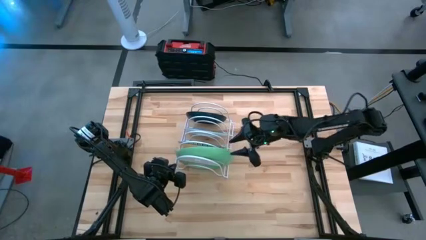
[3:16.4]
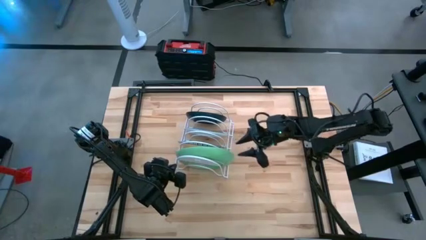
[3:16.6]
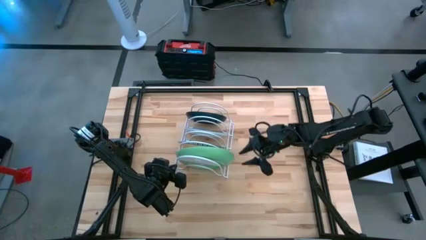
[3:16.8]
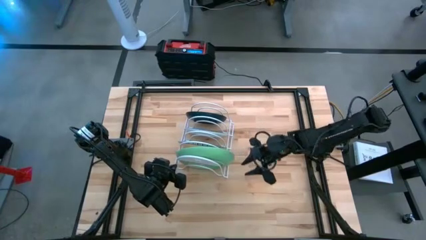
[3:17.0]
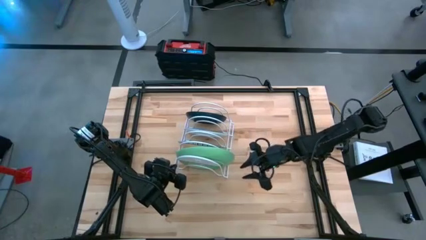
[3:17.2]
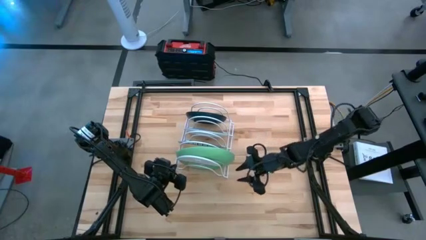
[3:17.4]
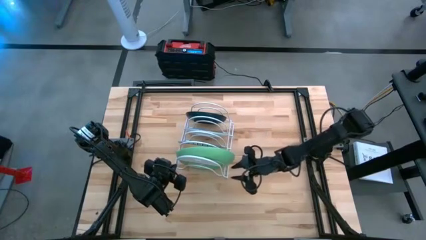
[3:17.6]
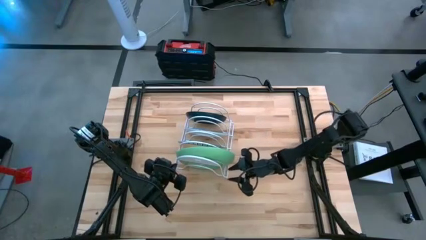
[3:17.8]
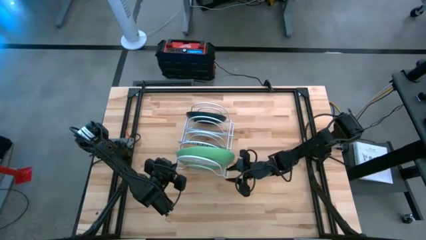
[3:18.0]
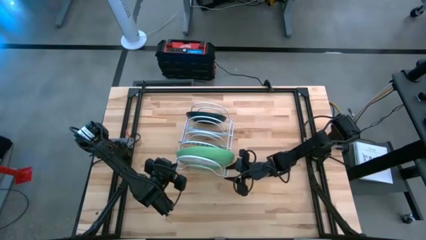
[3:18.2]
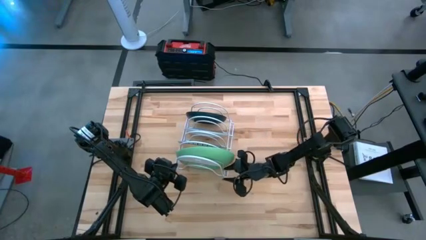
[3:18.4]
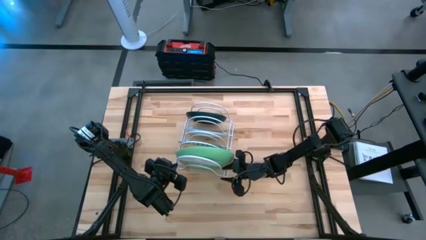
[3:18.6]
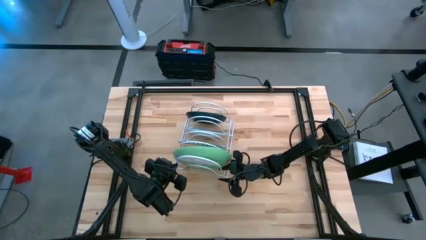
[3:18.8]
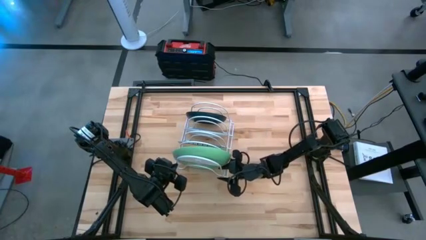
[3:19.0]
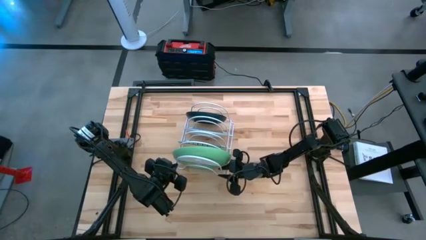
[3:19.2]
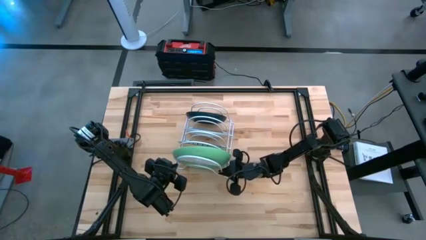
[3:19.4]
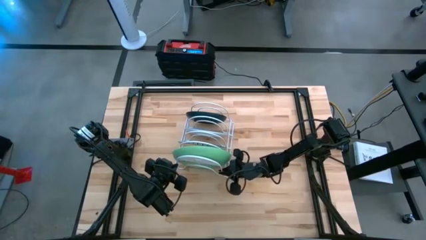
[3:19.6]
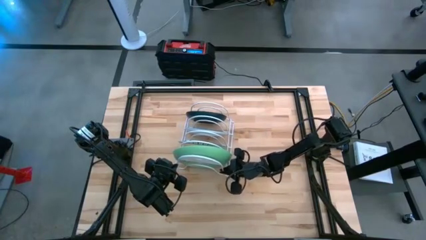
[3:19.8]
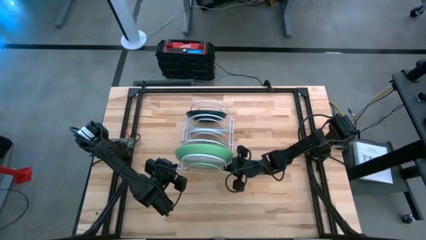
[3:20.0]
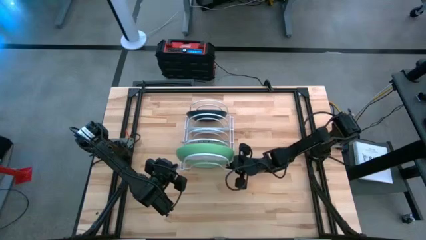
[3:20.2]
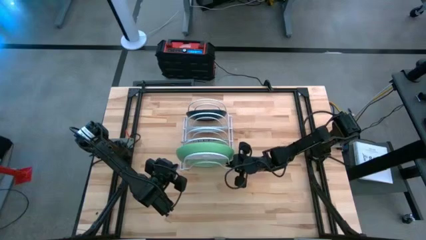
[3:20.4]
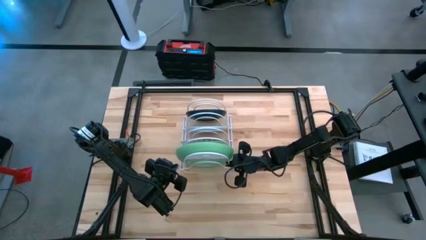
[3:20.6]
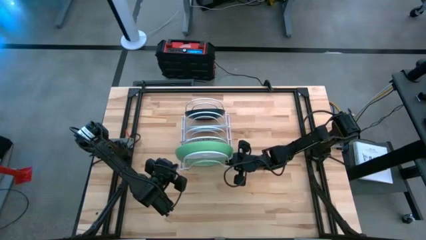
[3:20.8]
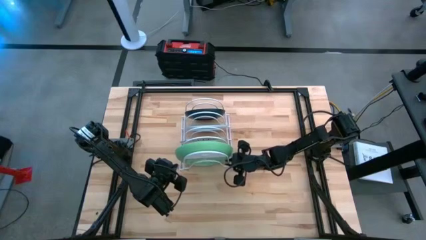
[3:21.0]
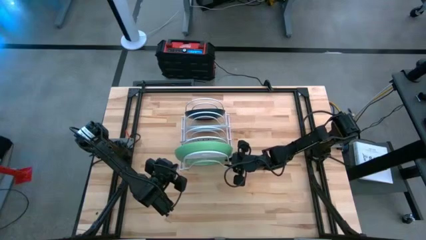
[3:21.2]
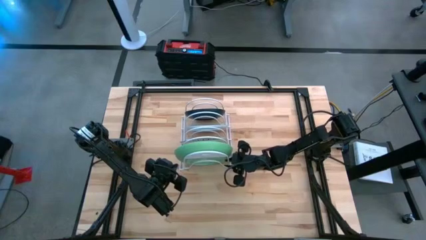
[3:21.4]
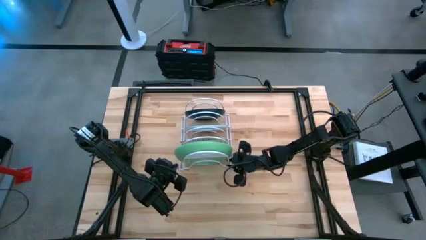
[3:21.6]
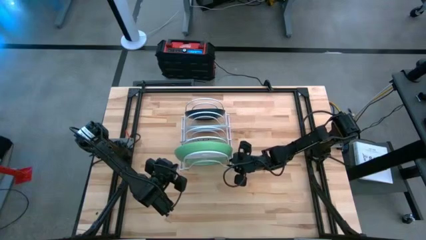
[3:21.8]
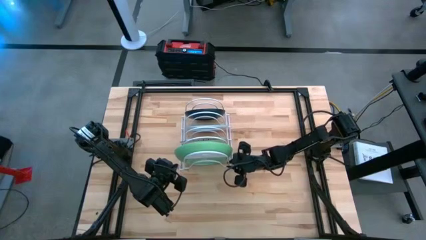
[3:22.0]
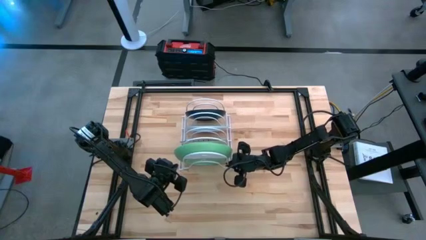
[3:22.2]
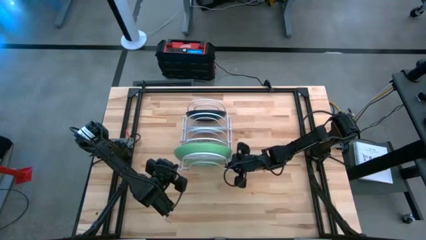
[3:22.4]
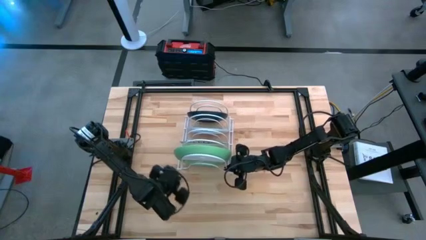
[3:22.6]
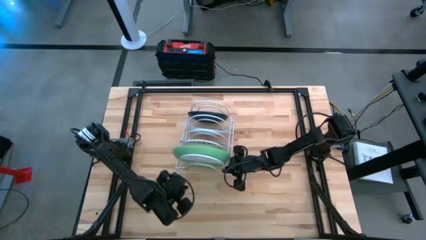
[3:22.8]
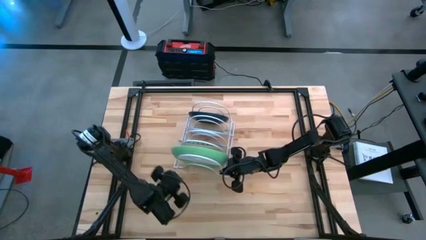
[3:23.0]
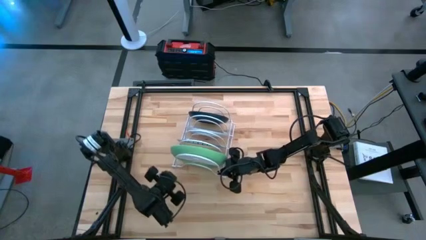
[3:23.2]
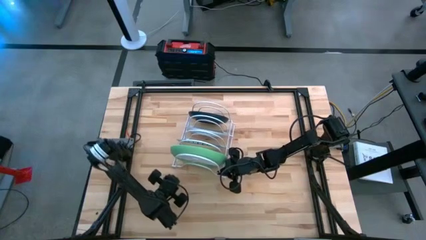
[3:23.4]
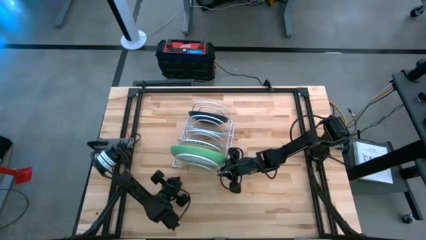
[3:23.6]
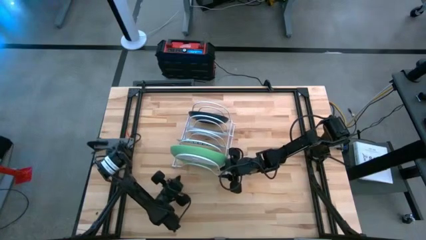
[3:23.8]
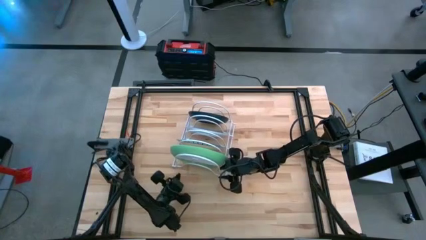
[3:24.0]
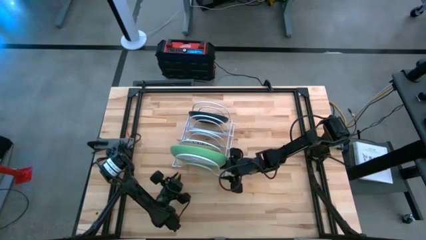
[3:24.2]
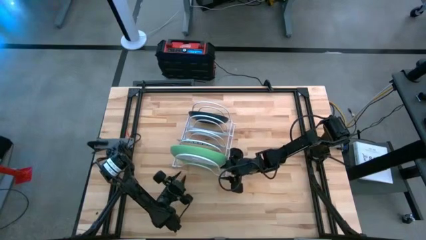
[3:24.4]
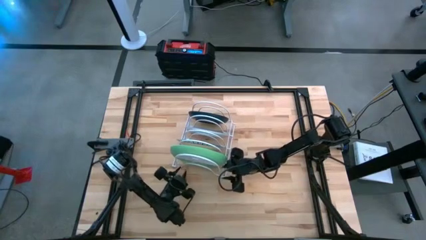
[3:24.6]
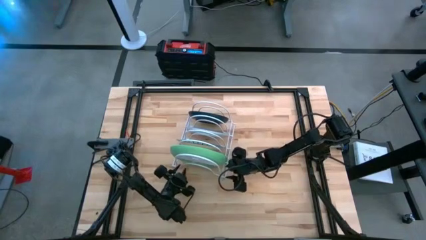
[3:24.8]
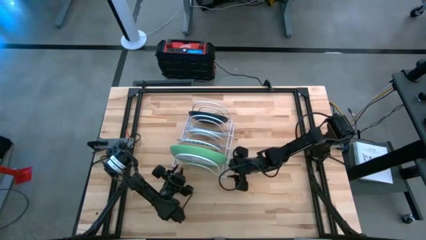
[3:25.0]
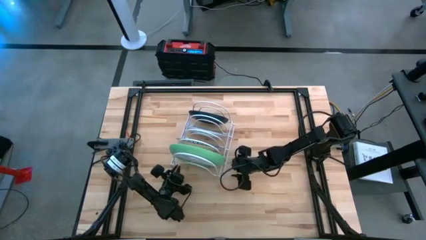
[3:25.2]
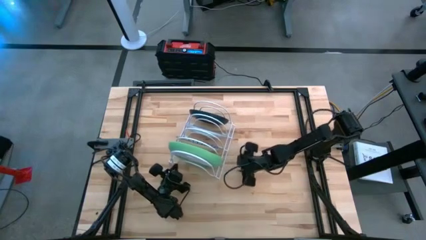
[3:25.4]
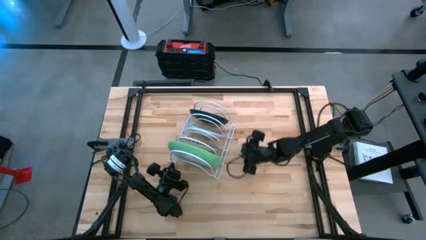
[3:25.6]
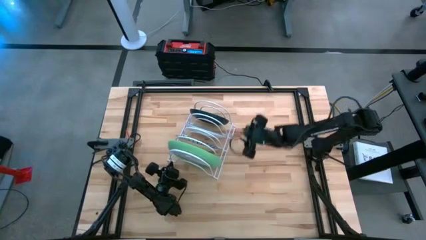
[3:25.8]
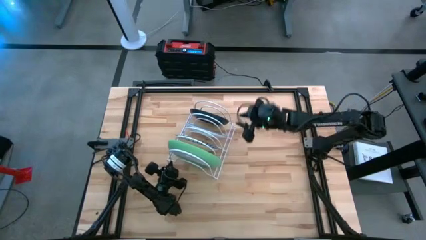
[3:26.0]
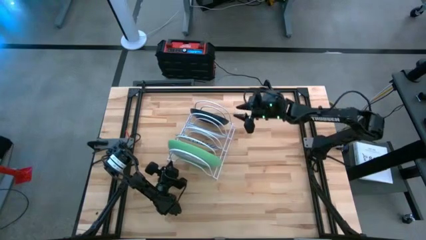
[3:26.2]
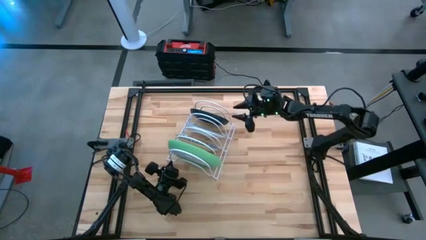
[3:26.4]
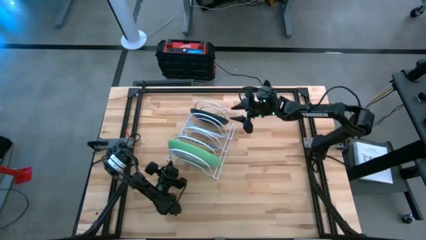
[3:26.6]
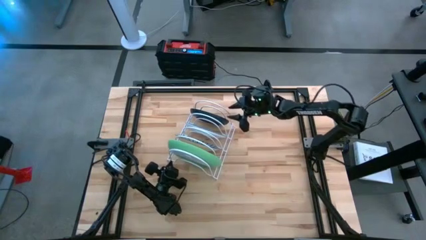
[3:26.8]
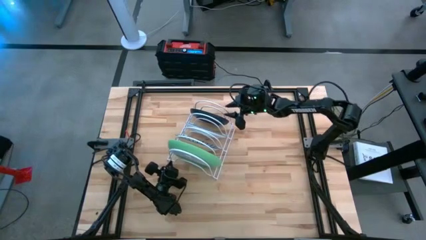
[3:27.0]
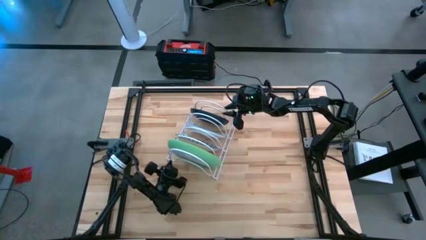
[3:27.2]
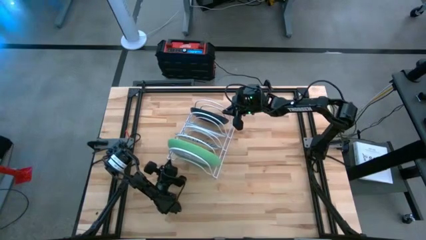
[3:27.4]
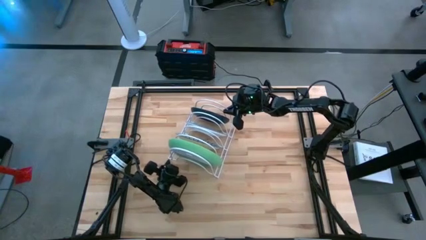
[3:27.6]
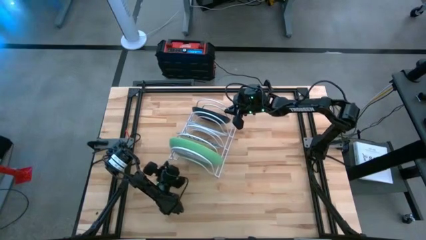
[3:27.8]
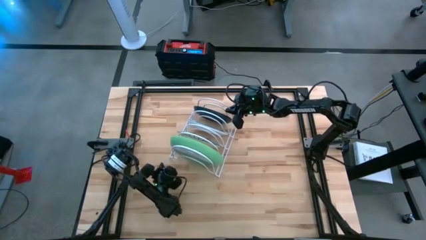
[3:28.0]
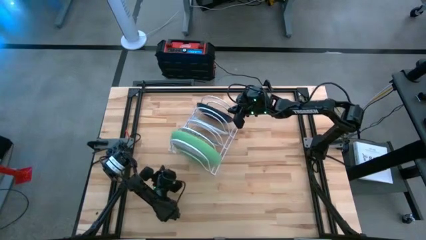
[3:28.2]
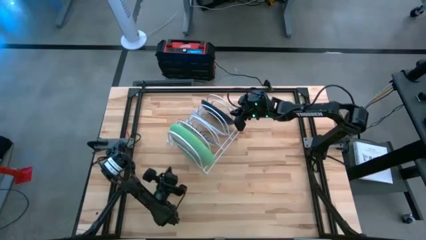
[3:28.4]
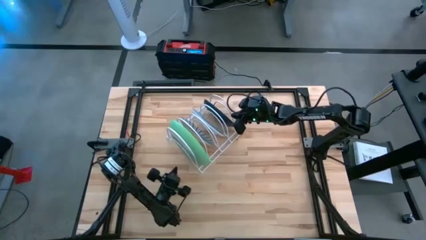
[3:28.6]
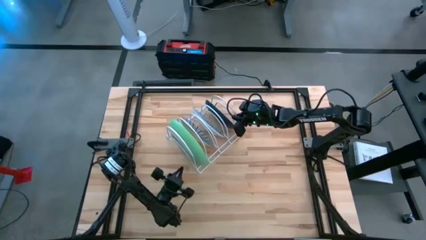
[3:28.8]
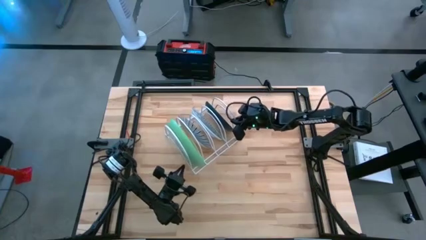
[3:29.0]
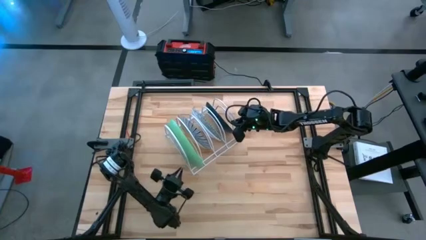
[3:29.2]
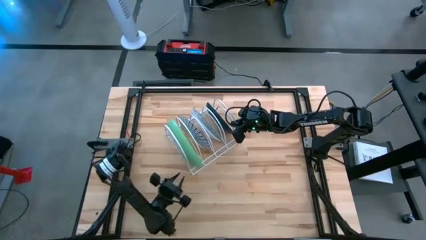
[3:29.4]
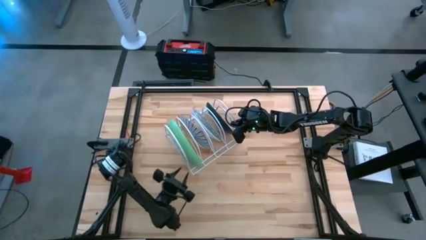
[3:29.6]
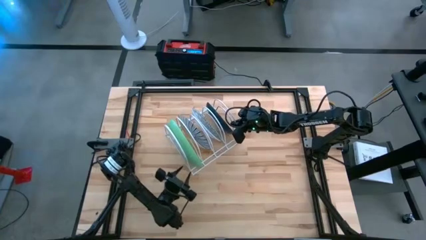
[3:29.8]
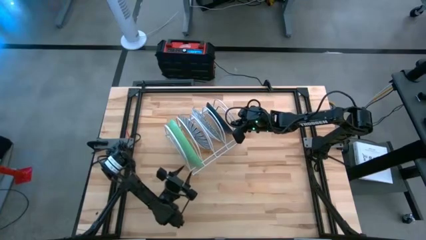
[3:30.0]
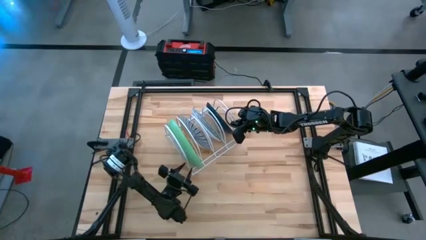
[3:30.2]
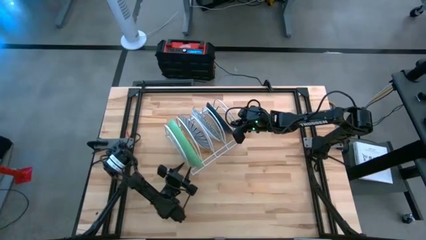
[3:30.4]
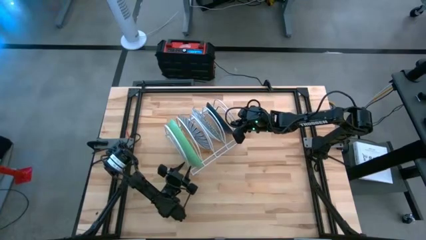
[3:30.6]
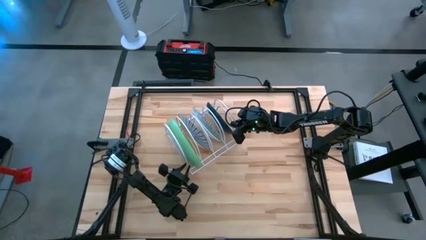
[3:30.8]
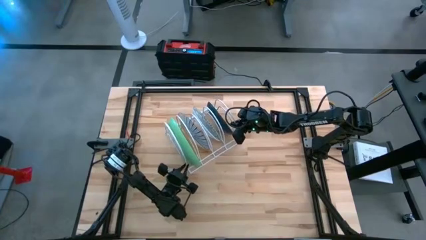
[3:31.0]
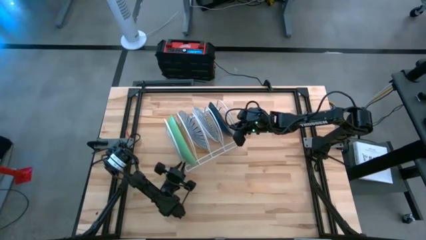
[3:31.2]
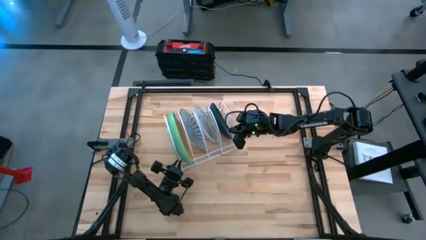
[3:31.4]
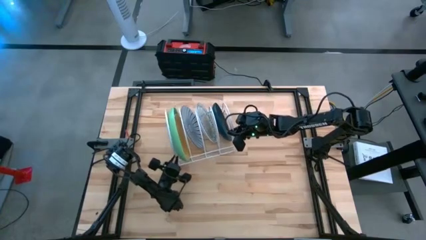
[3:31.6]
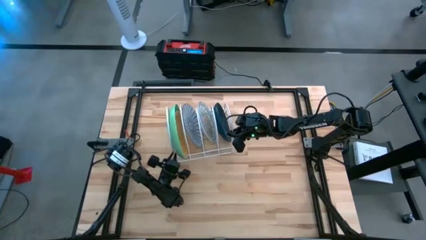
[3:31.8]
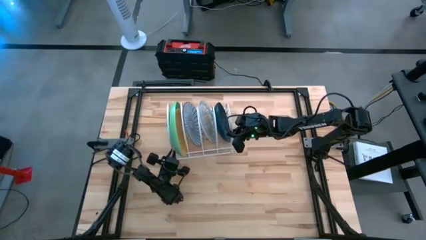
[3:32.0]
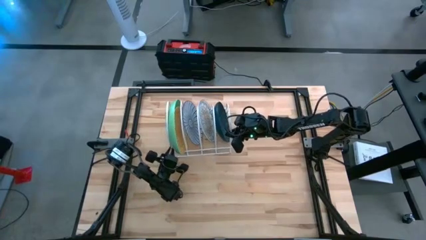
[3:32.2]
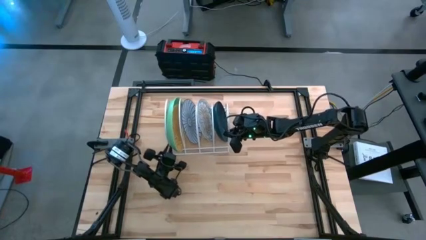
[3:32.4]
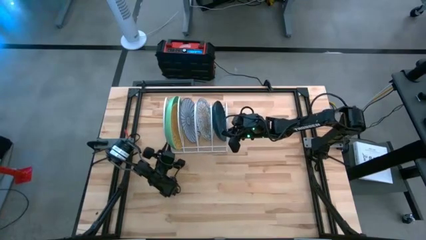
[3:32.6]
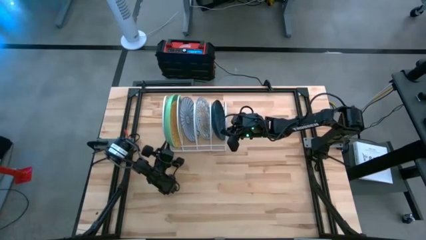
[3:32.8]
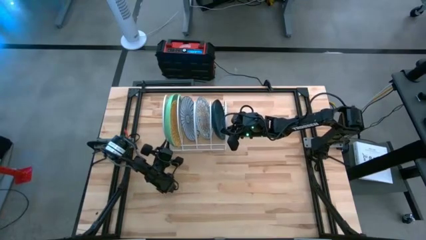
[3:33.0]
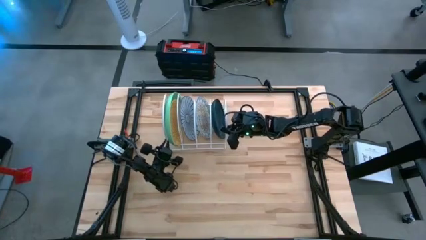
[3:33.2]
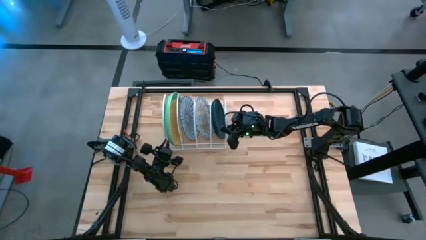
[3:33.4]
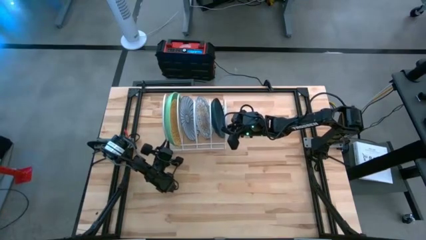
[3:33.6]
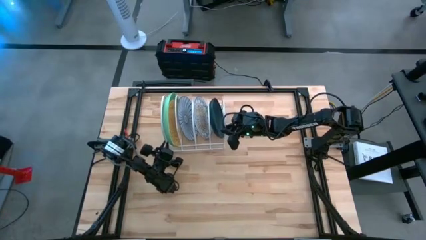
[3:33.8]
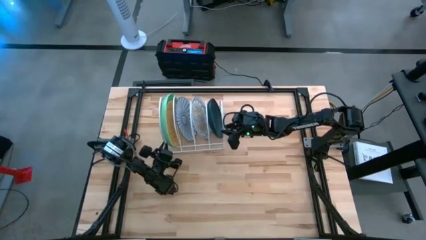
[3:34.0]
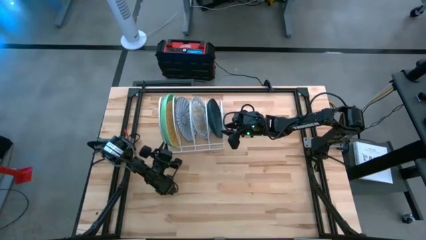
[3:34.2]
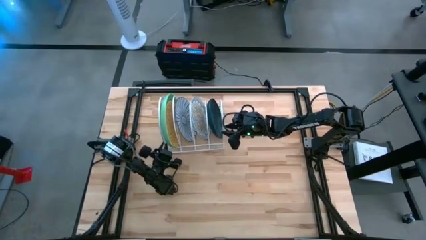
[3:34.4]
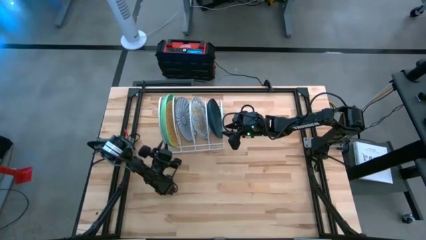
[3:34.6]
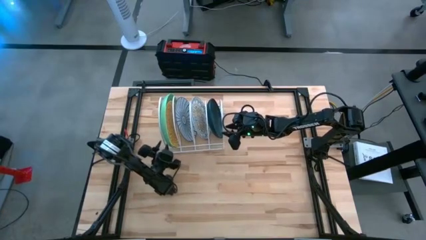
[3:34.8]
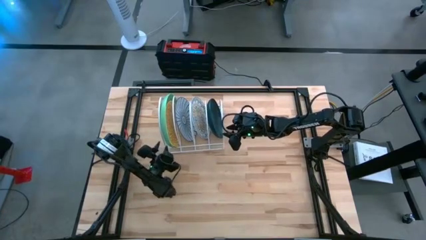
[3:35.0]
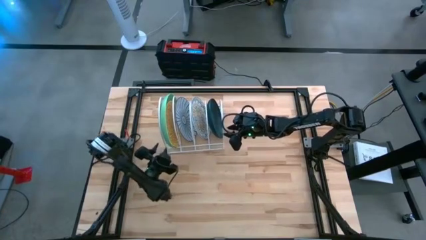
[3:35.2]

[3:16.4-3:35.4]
Task: Sort dishes
Adjust the dish rack
